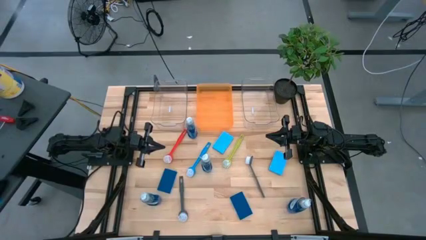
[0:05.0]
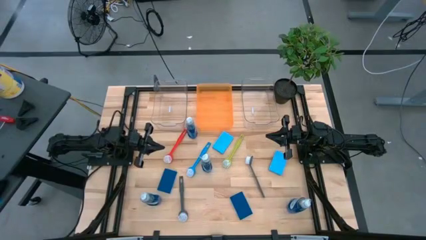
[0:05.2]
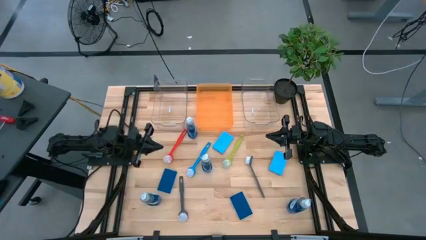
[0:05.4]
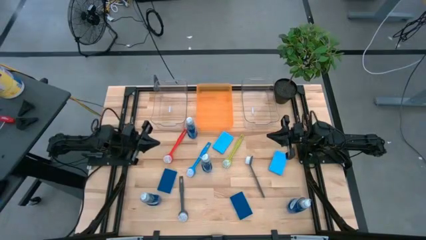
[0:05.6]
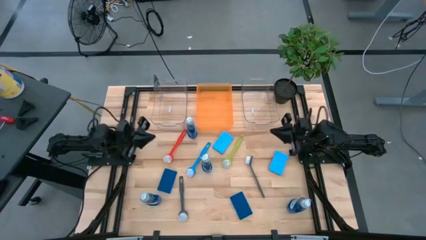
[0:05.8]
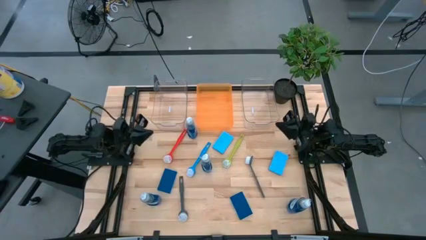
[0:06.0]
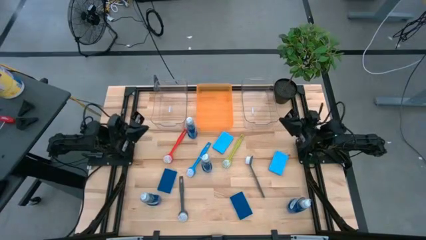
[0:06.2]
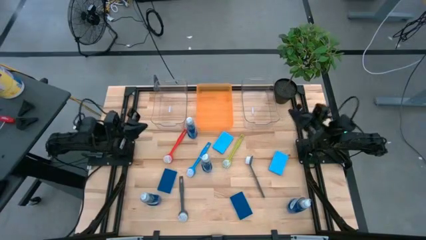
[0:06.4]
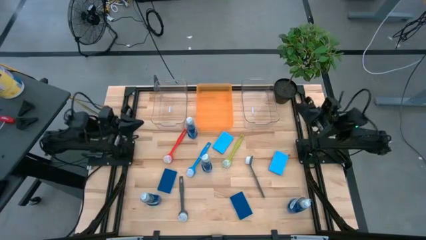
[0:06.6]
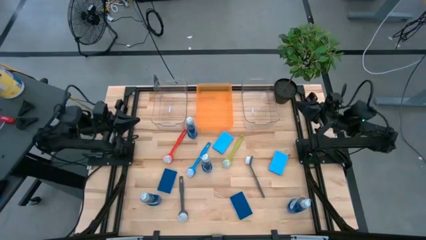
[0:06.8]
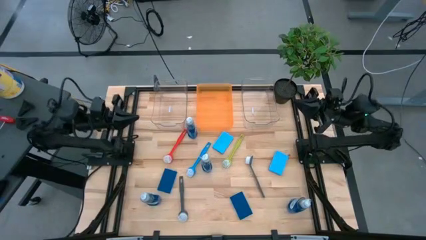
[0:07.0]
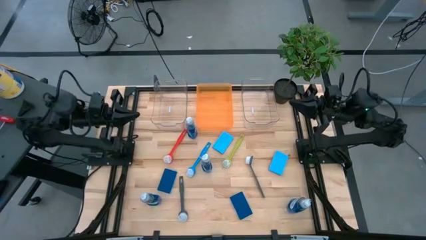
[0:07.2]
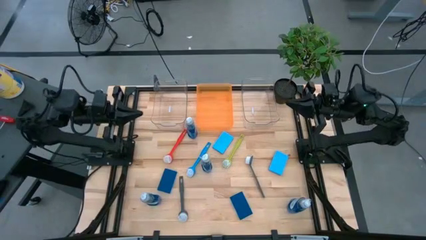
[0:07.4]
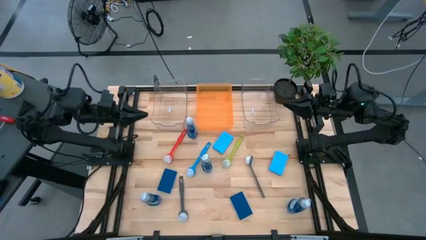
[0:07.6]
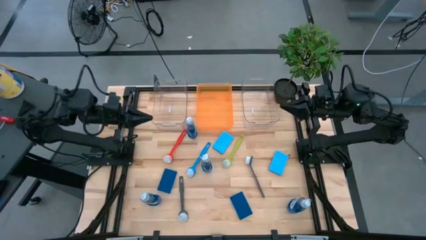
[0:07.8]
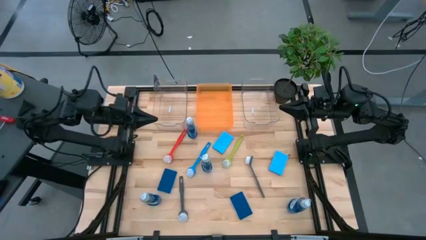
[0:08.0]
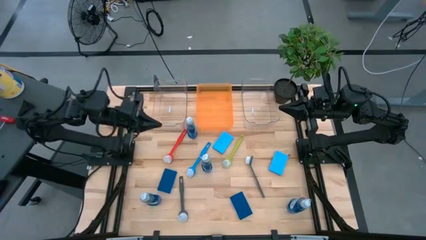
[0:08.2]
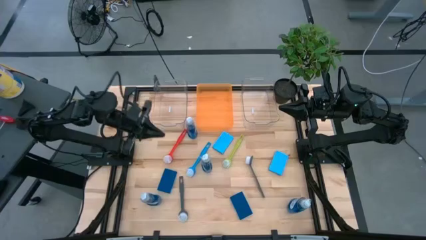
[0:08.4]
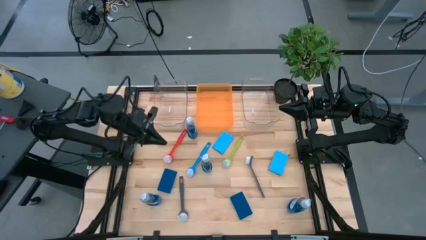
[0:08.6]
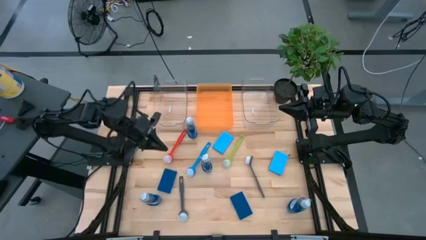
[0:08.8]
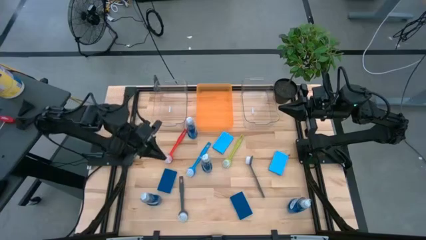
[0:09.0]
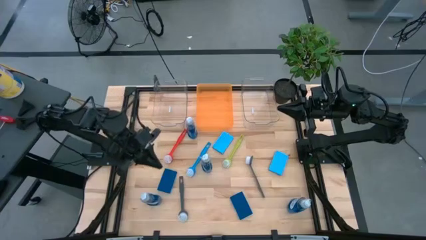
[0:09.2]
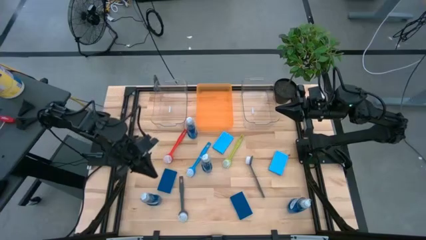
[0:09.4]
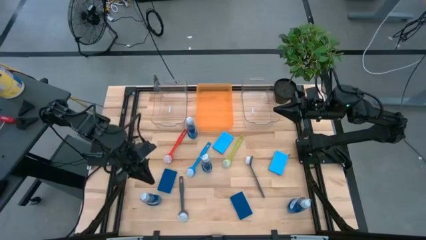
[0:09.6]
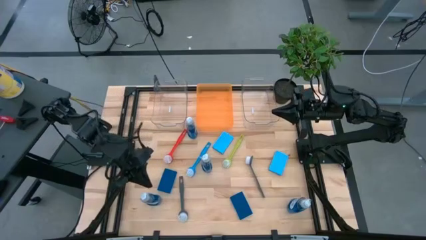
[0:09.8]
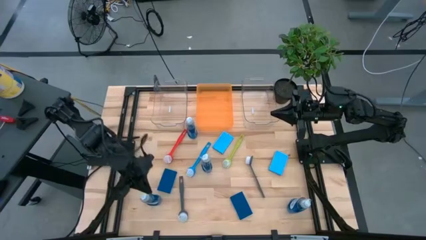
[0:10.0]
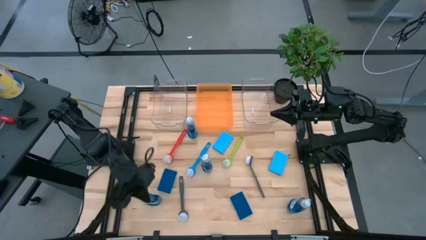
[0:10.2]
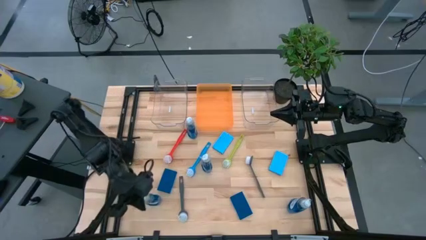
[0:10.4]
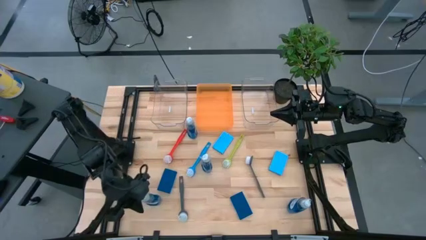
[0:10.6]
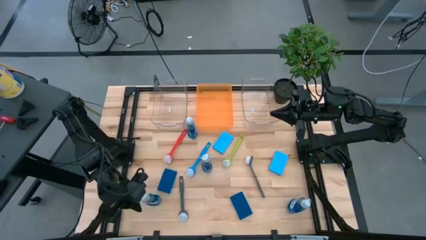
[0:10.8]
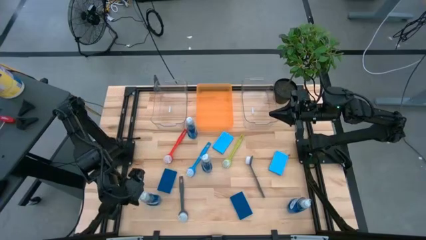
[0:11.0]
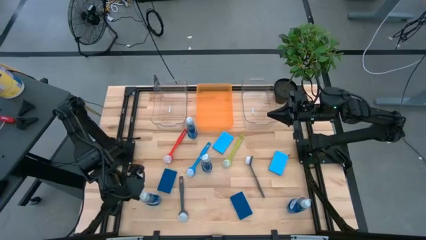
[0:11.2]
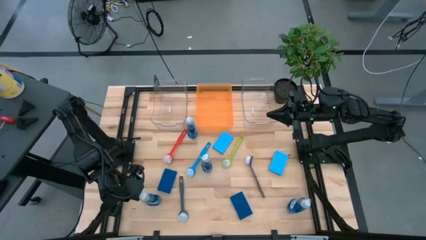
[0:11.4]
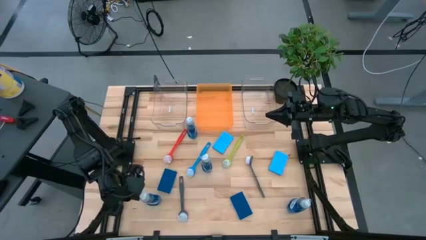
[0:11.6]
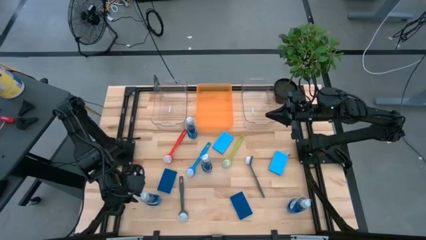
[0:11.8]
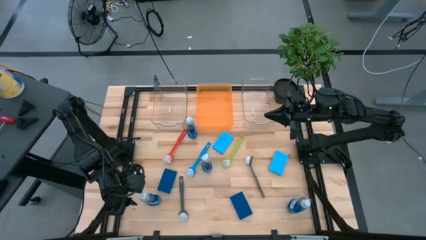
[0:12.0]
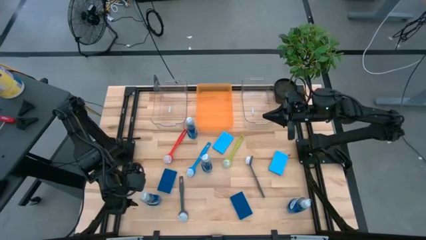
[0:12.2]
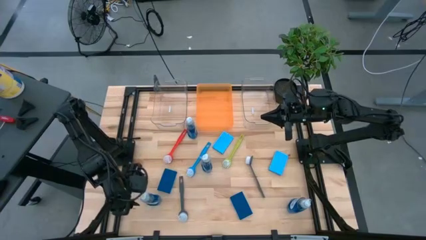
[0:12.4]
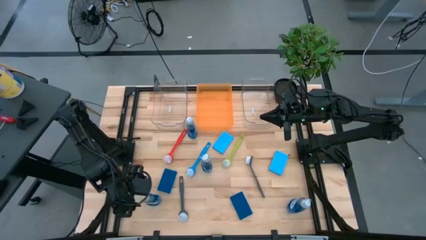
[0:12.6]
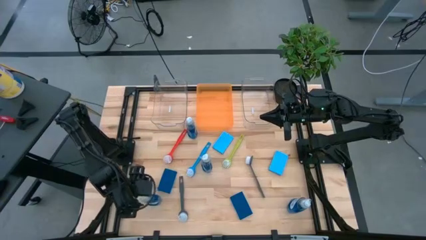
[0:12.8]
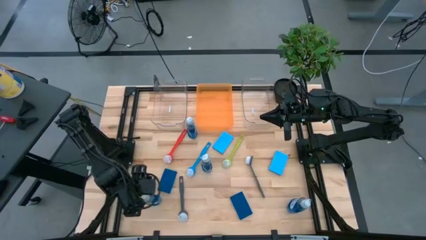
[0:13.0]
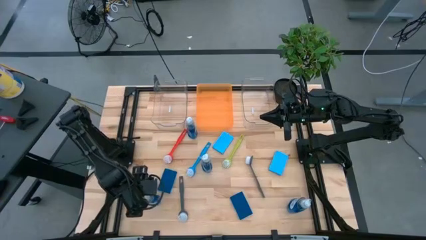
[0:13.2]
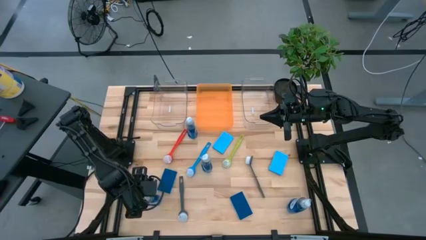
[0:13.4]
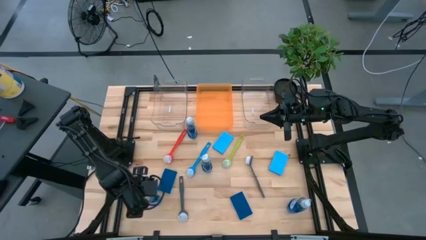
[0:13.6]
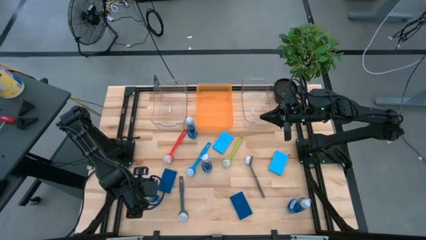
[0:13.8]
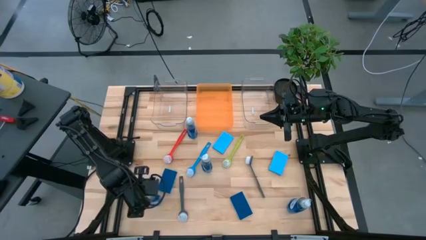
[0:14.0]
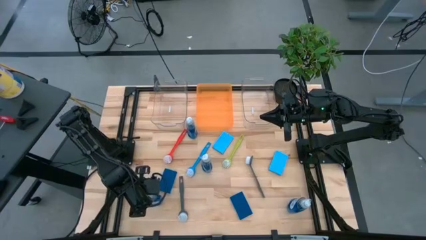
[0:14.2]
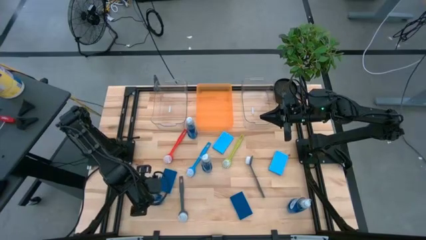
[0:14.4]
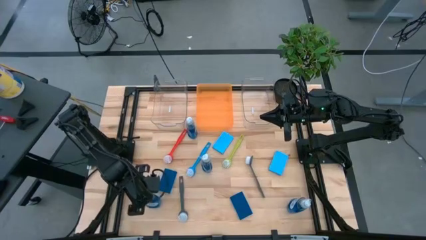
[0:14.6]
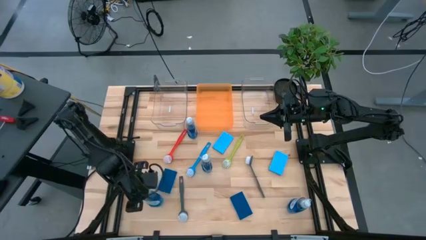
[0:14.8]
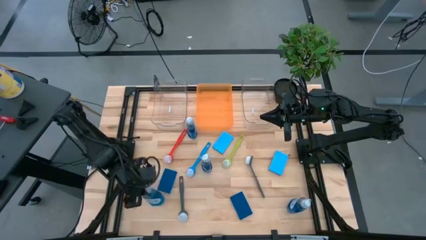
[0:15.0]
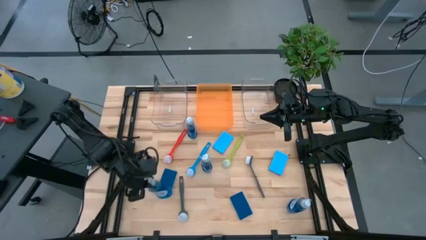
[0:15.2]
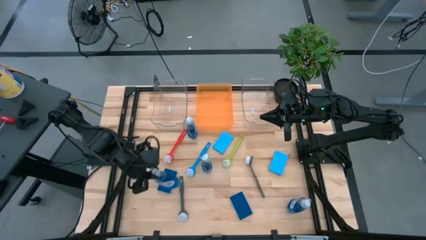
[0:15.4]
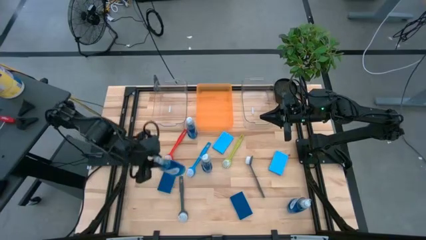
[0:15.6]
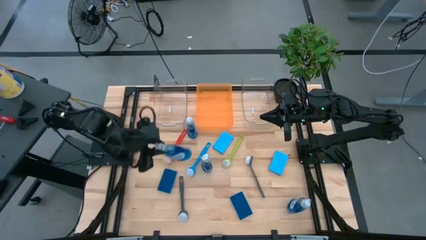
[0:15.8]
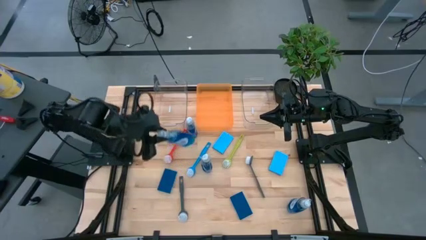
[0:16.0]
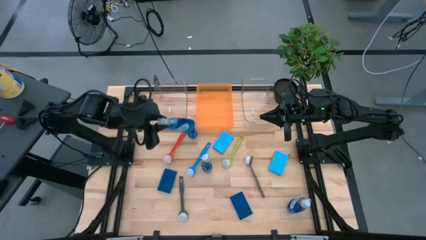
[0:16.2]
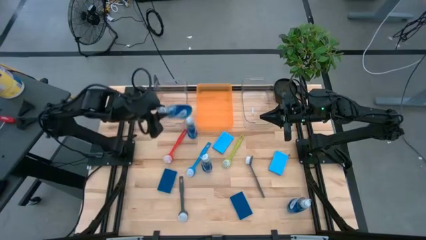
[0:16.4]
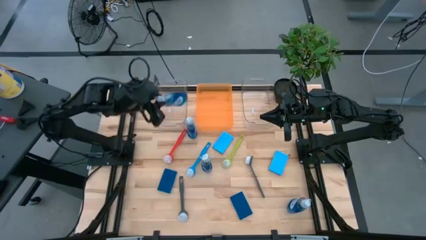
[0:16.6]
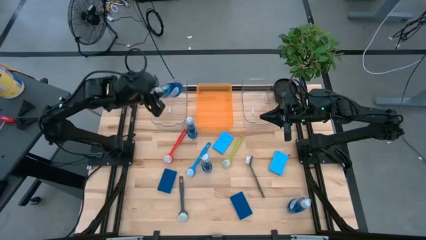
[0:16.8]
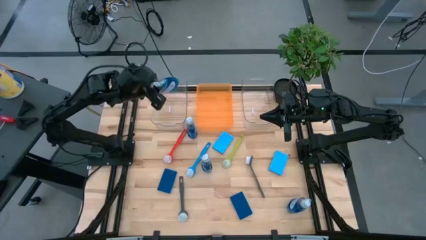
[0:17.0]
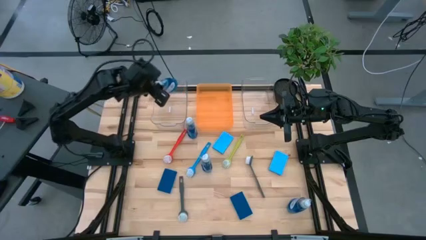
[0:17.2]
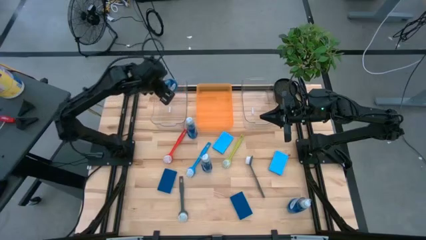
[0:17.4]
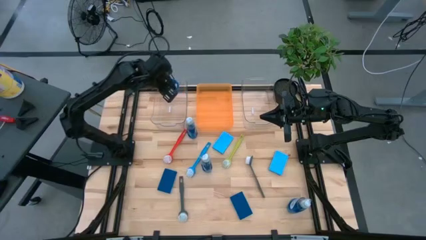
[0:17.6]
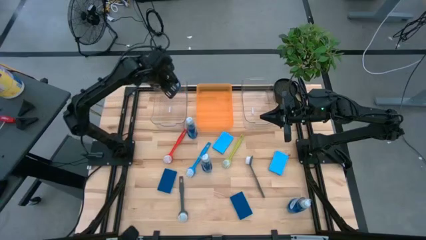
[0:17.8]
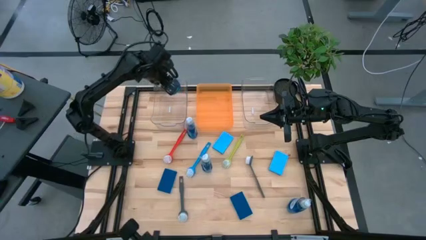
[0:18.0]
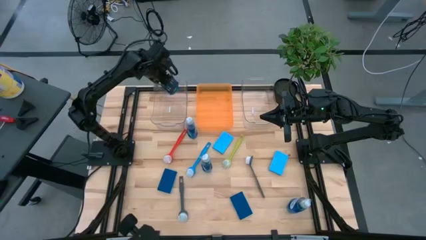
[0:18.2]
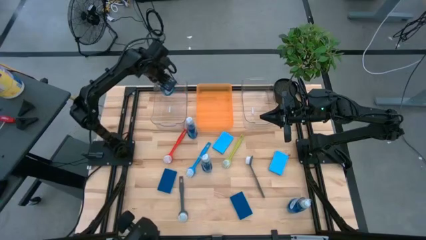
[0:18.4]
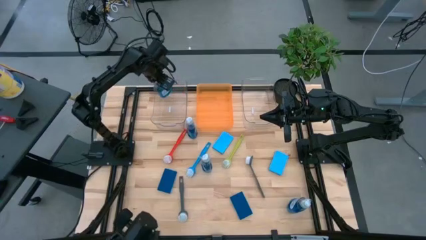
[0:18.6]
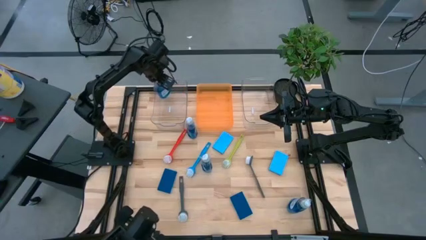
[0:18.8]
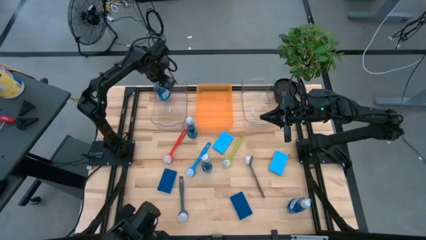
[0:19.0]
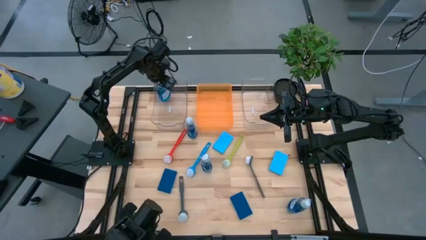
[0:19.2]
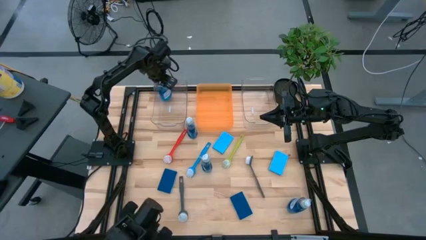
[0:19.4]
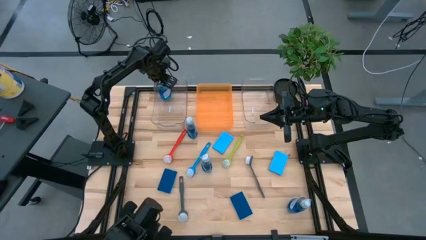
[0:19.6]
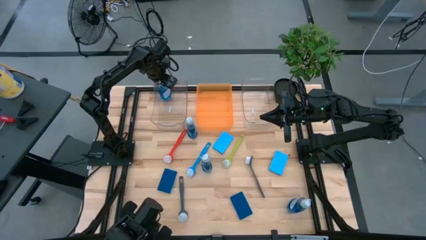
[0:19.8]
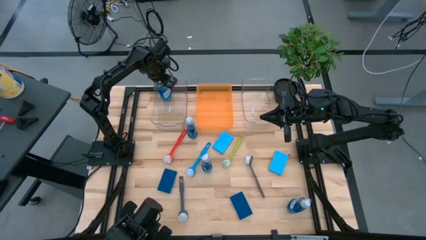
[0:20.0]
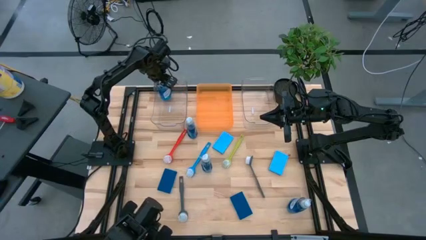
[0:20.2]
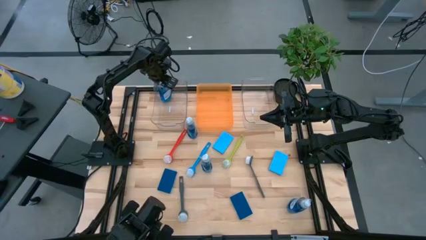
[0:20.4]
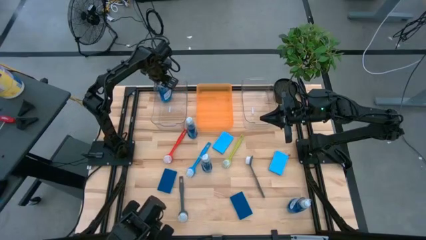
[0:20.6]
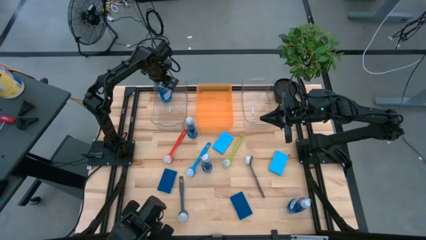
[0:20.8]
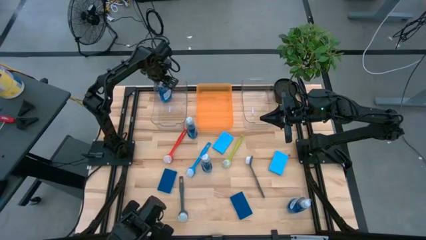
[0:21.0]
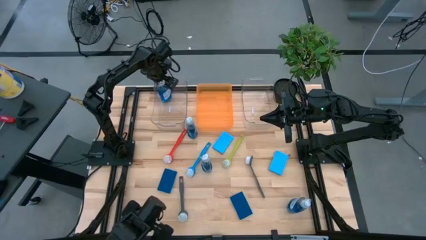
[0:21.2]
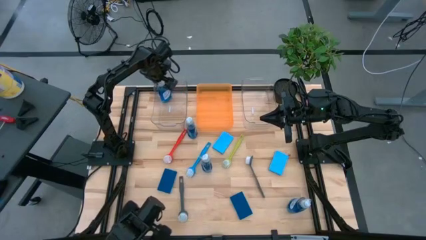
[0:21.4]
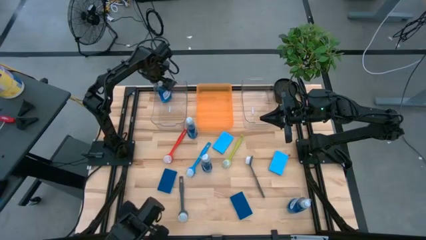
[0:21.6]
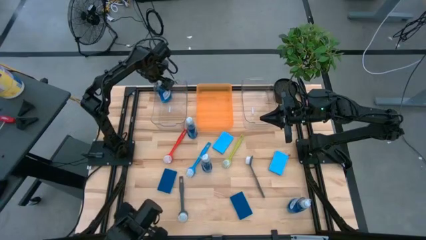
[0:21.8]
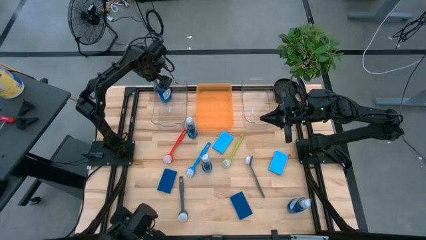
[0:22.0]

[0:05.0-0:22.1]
Task: Pick & Place Kitchen Sink Supplies
Put the dish soap into the left transparent bin
